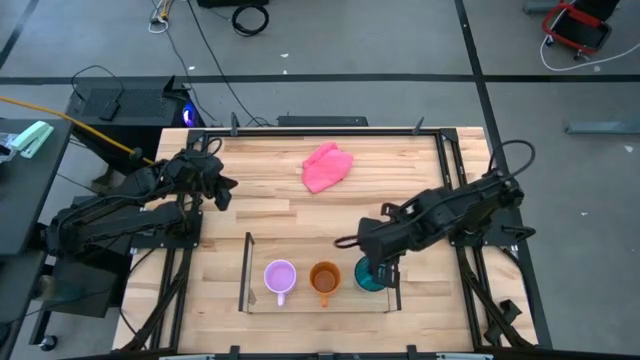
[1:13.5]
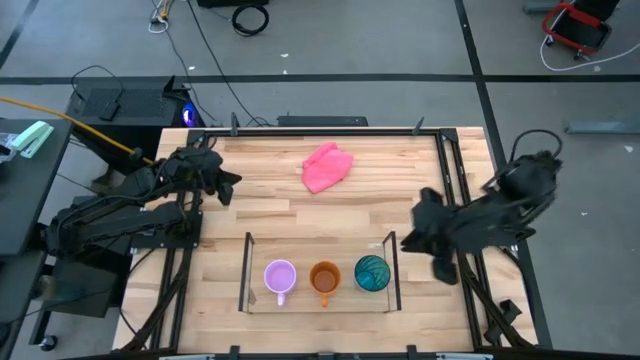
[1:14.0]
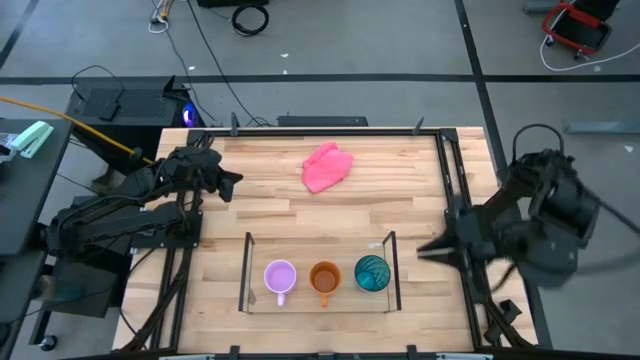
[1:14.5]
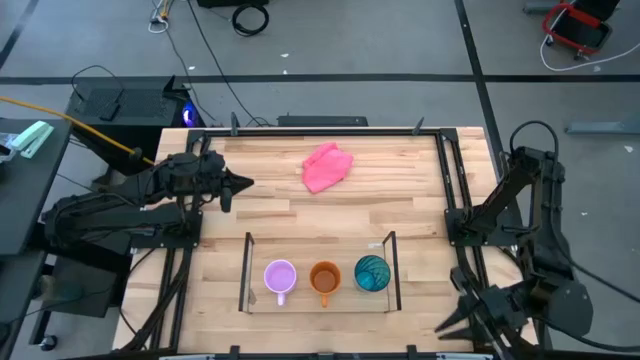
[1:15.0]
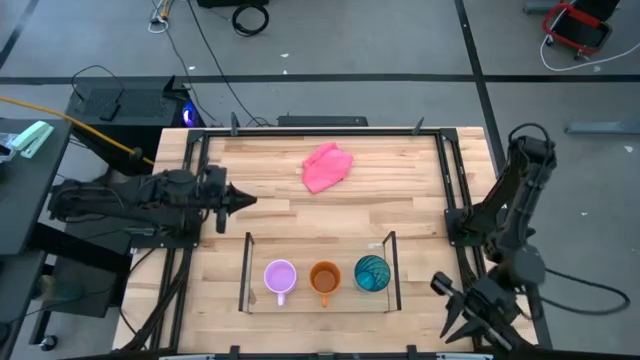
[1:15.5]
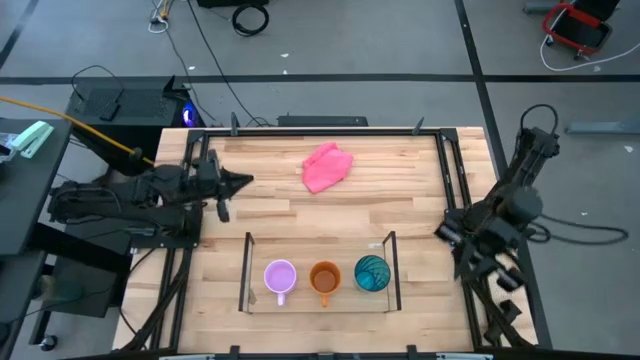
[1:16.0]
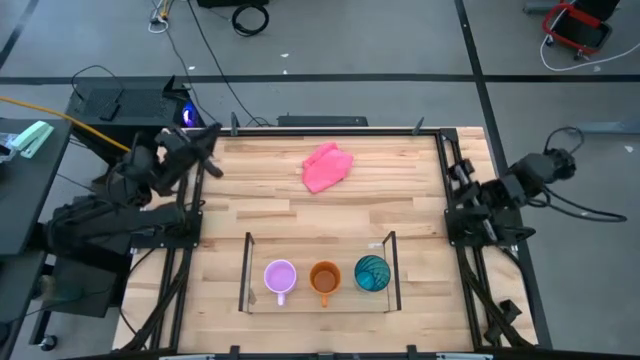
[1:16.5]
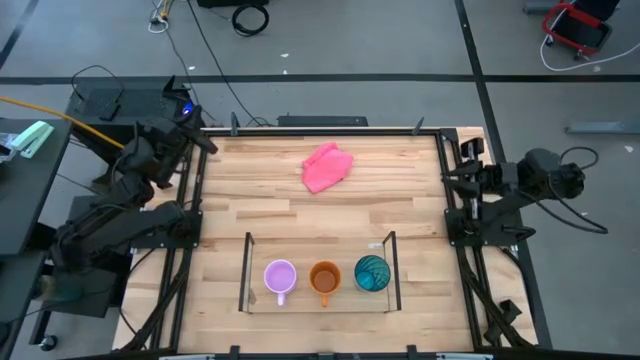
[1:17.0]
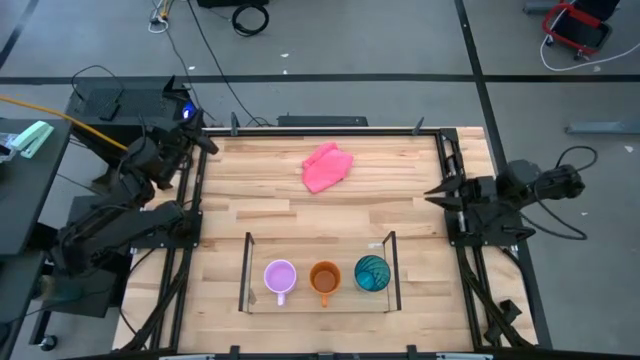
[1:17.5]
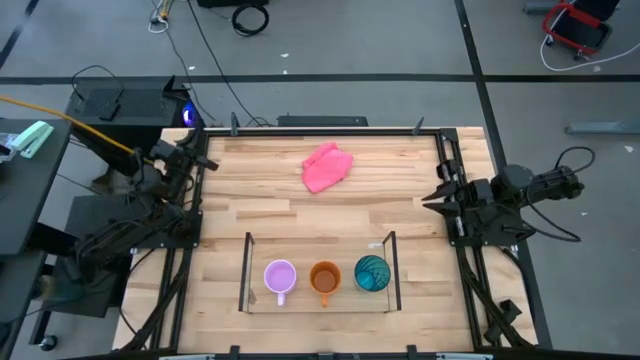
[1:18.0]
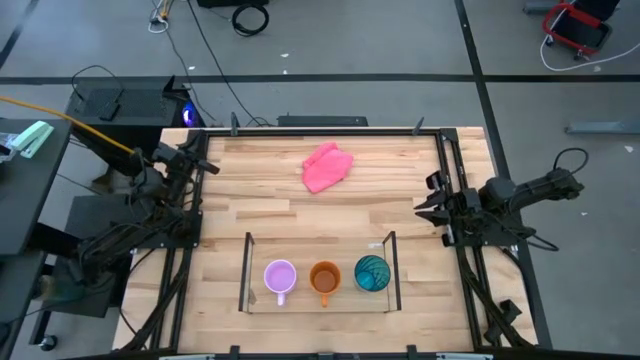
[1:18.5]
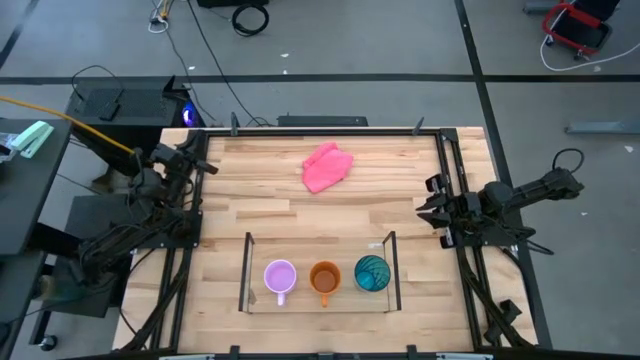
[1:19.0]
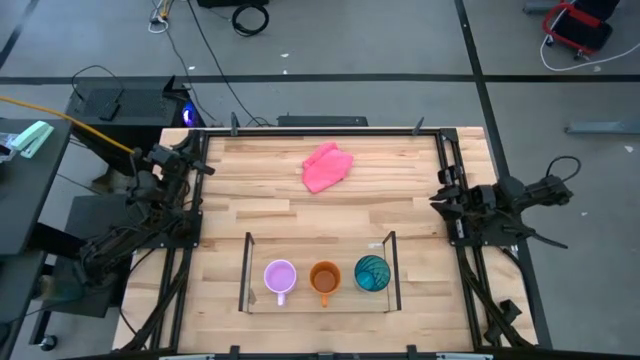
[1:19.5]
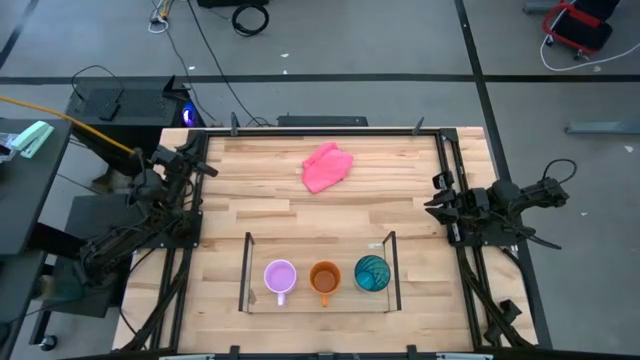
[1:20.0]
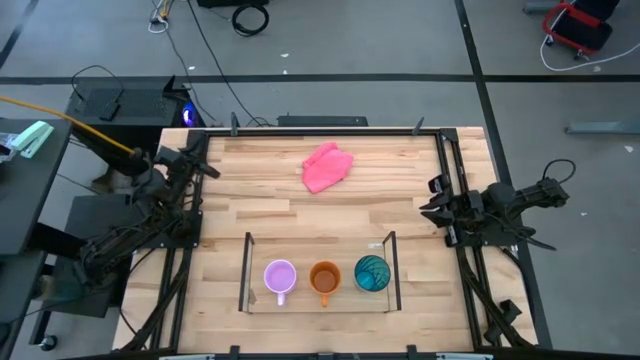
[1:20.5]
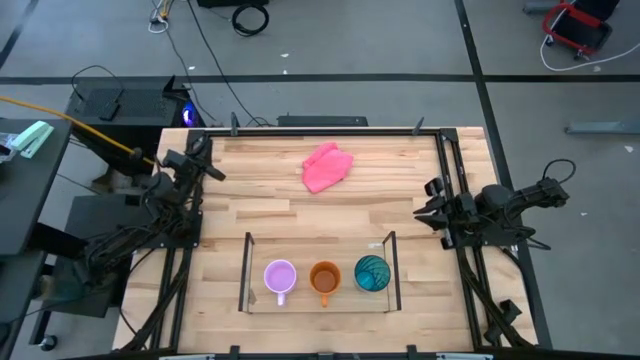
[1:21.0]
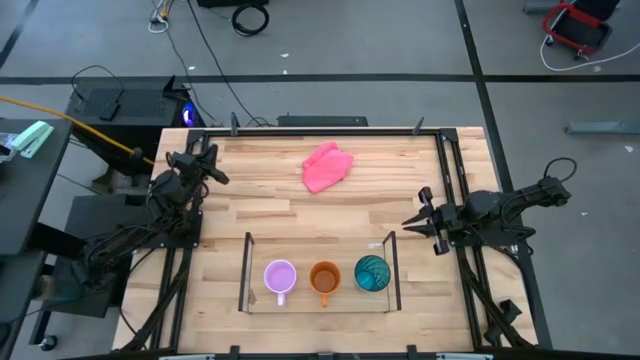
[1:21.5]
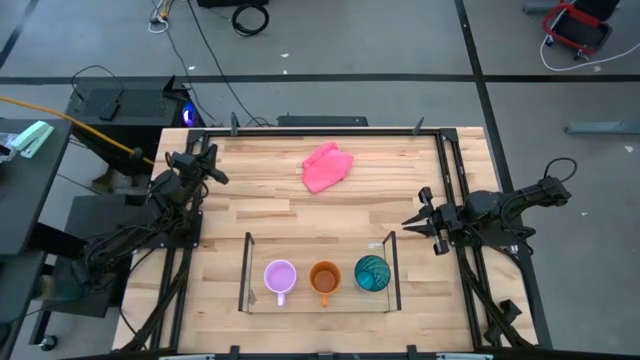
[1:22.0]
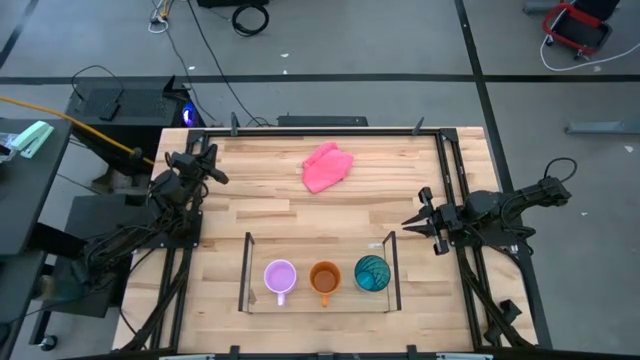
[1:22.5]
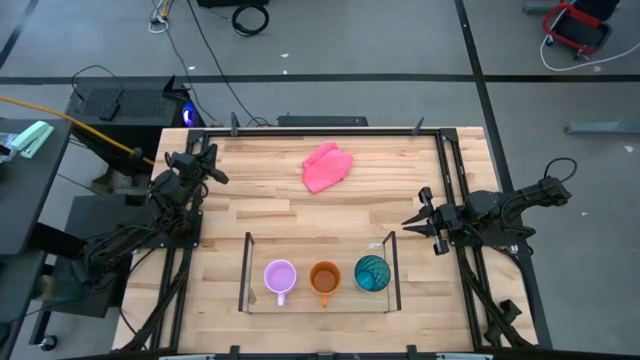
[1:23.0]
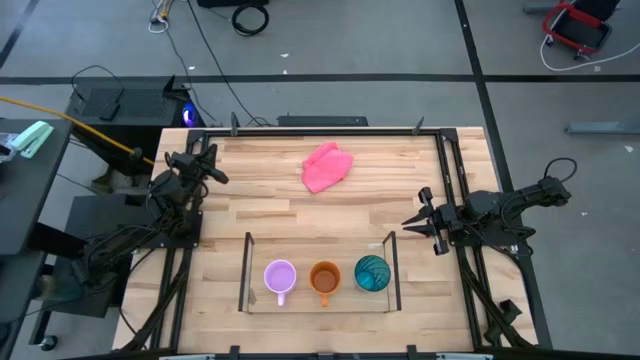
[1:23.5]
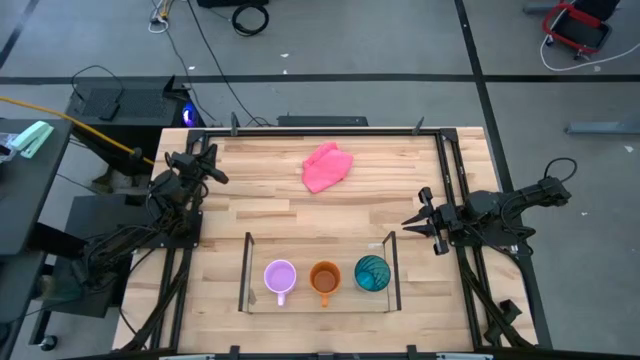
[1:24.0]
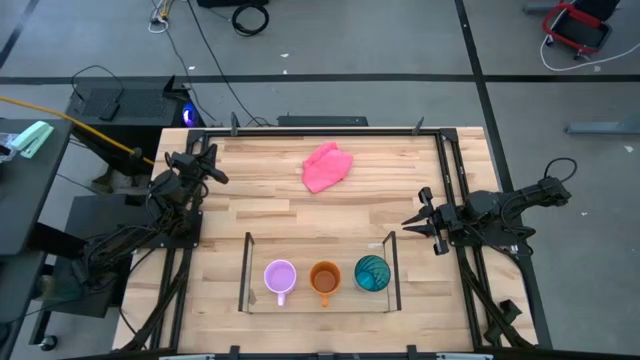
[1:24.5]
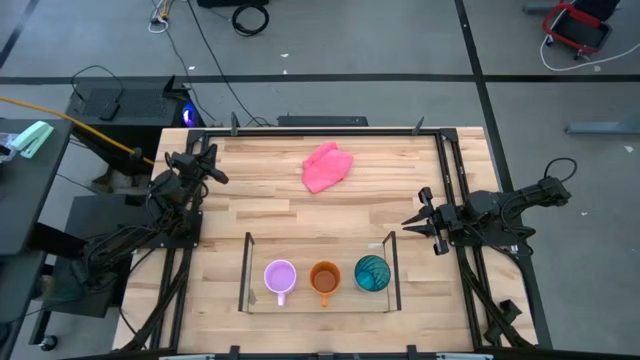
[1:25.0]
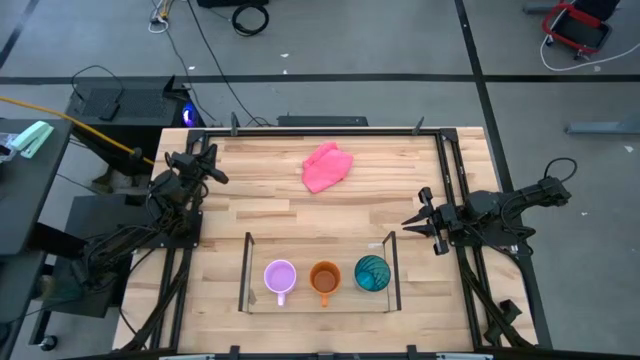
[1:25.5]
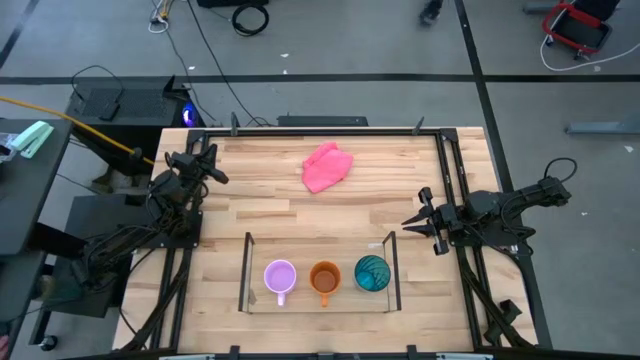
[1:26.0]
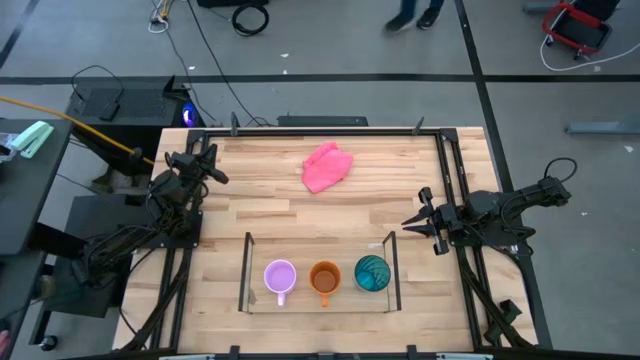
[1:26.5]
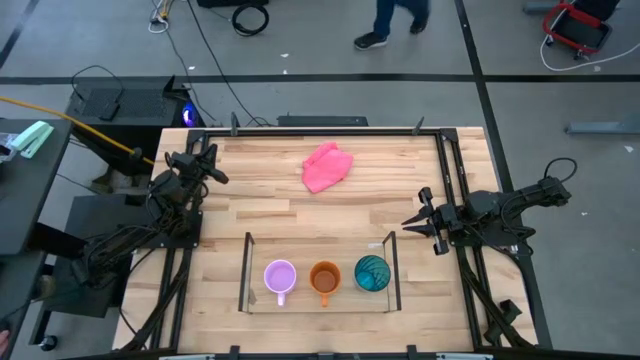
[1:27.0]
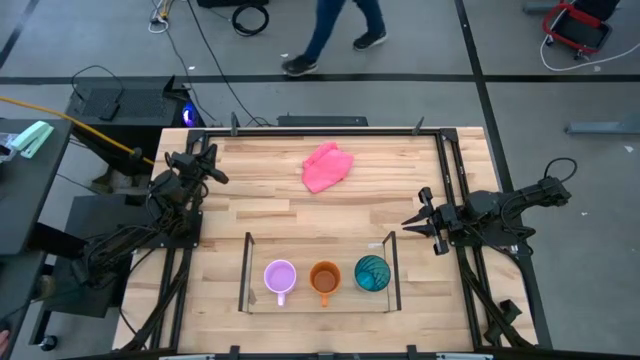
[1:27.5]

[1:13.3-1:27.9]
Task: Stack small to large cups/mugs on shelf
Return to Home Position
